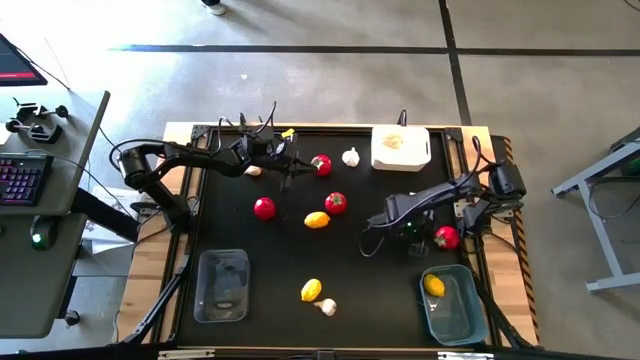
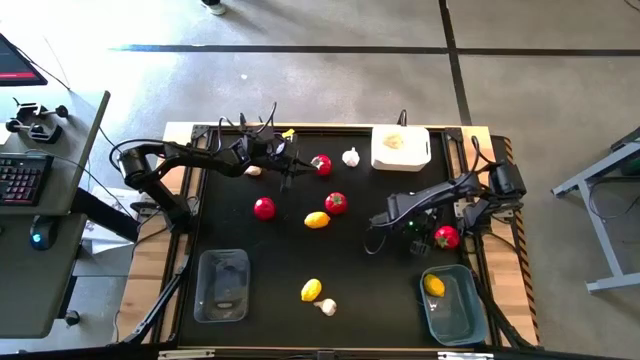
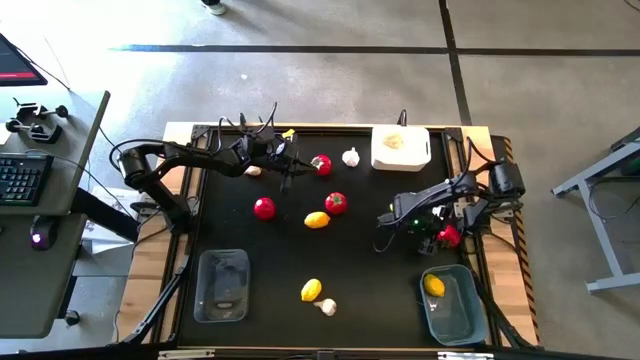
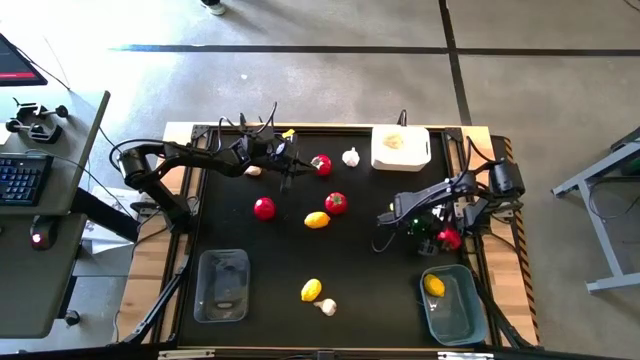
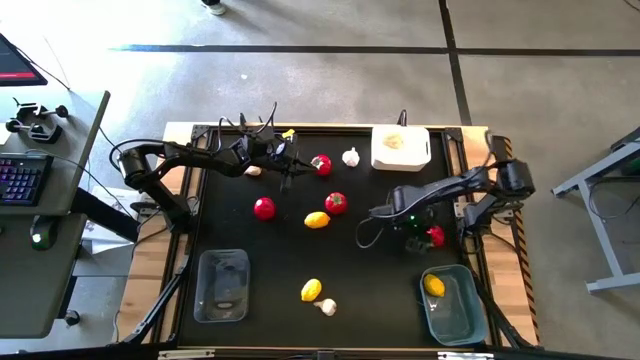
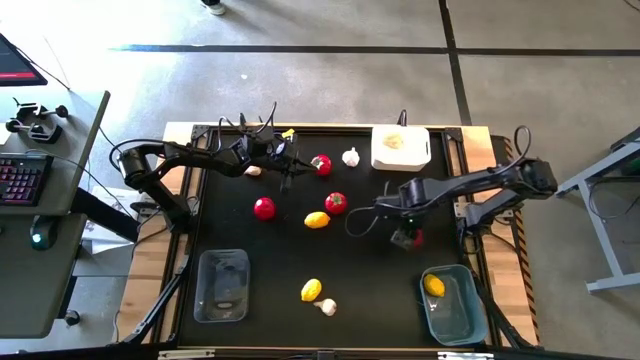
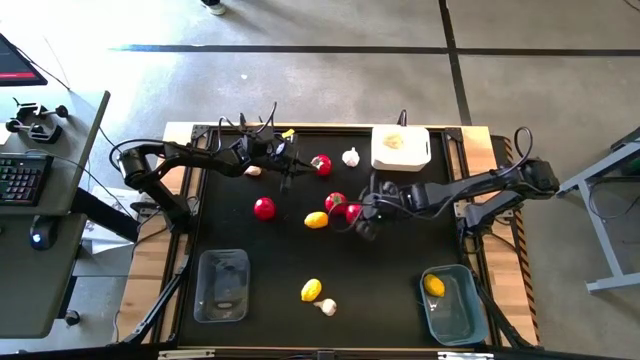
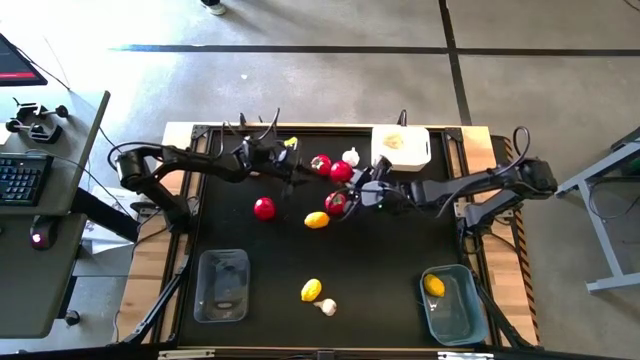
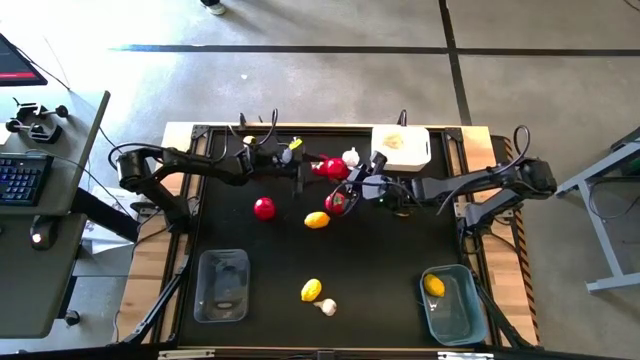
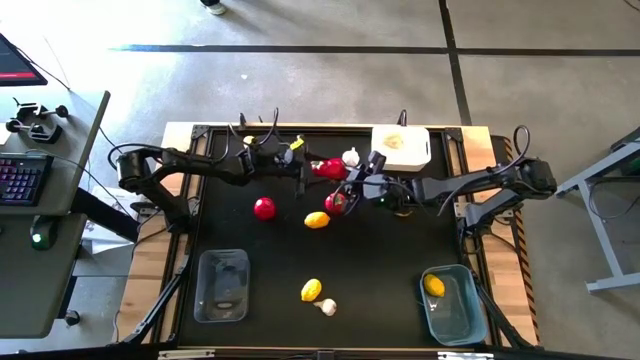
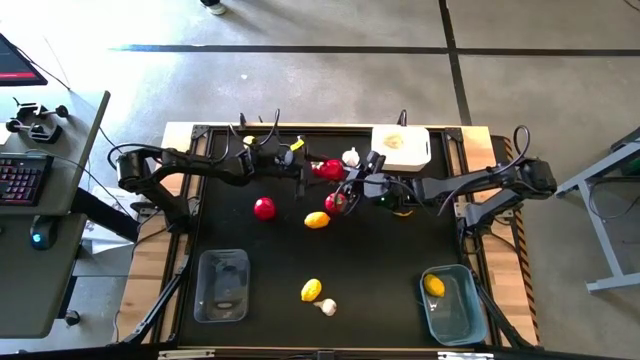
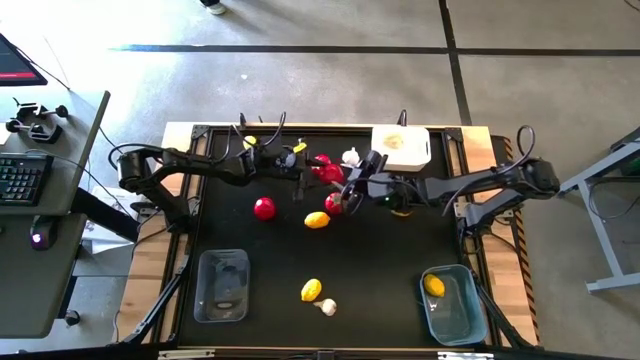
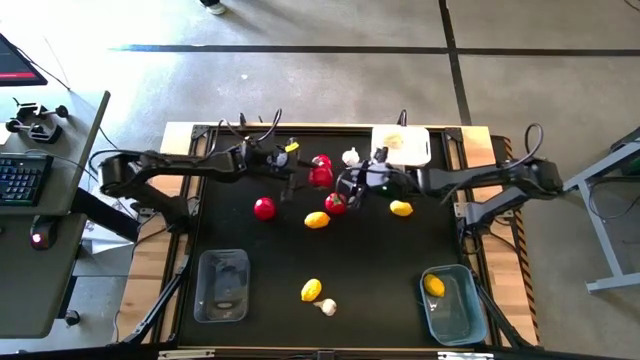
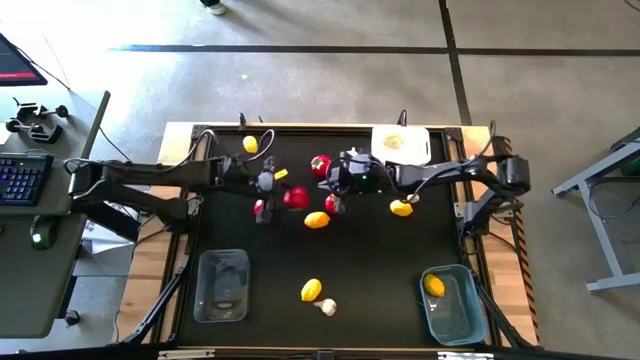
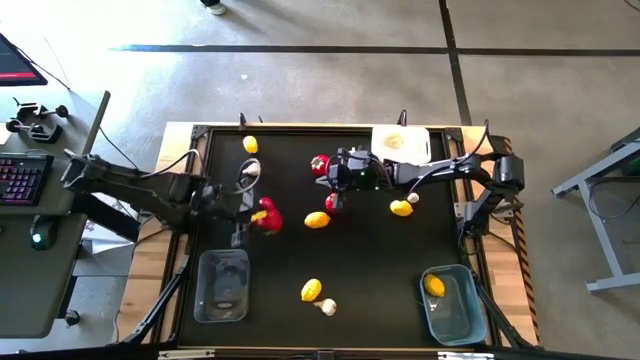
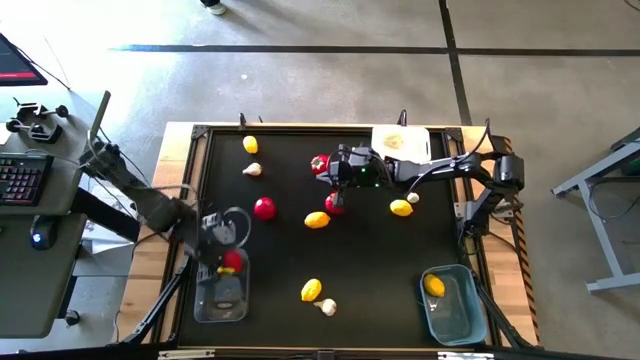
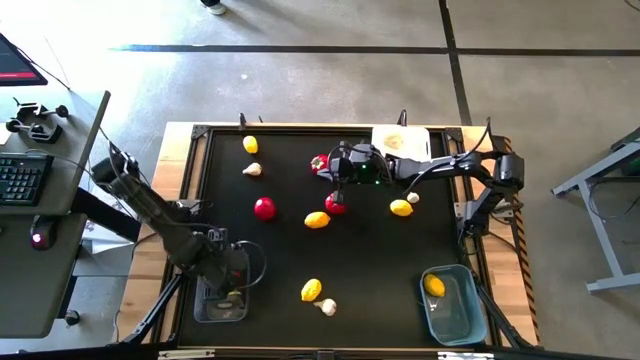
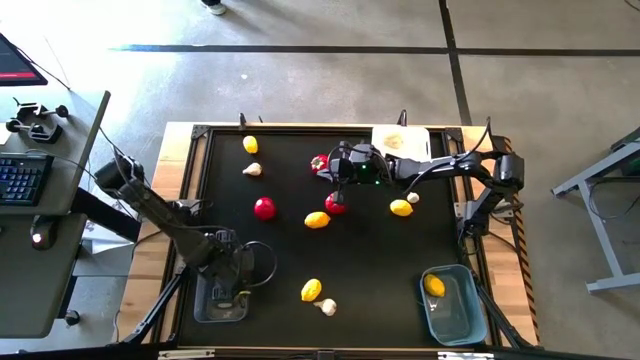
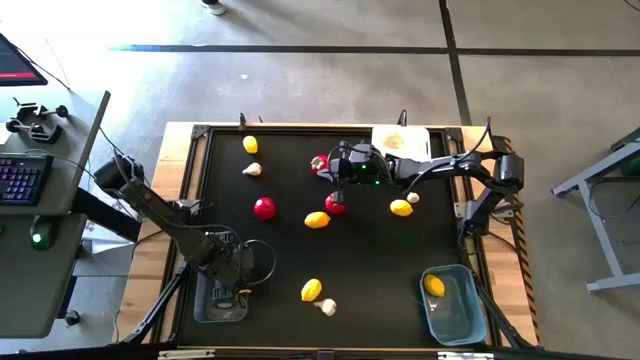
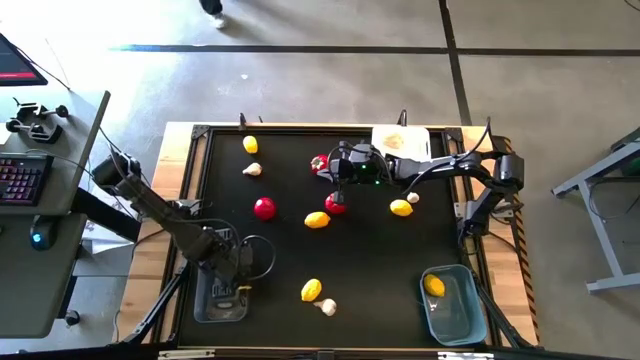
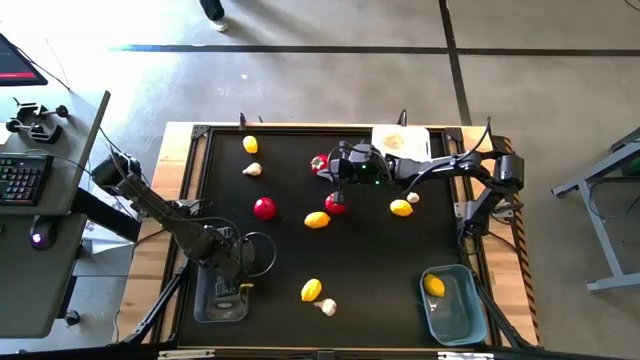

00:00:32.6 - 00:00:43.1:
Task: Sort produce into baskets
Put the tomato into the transparent bin

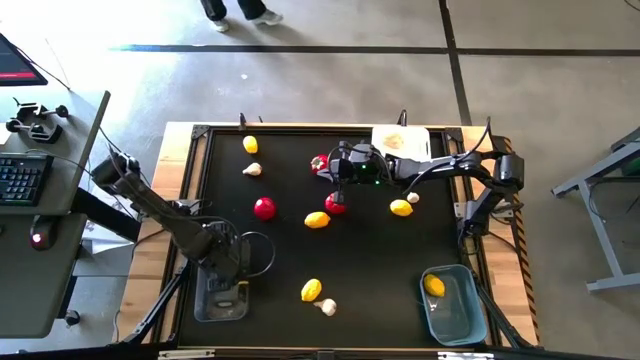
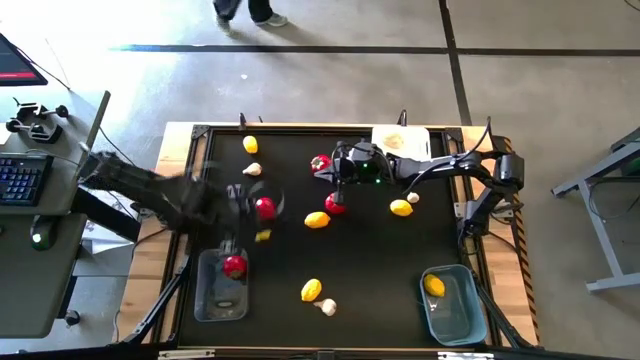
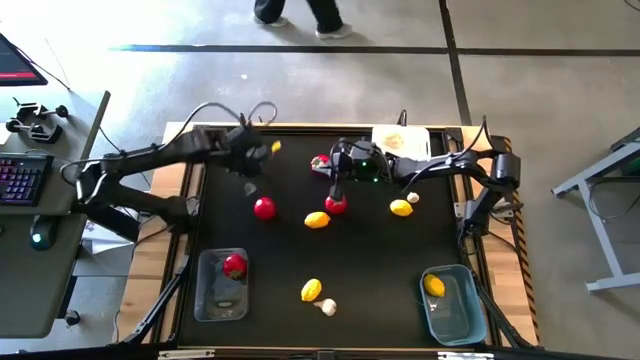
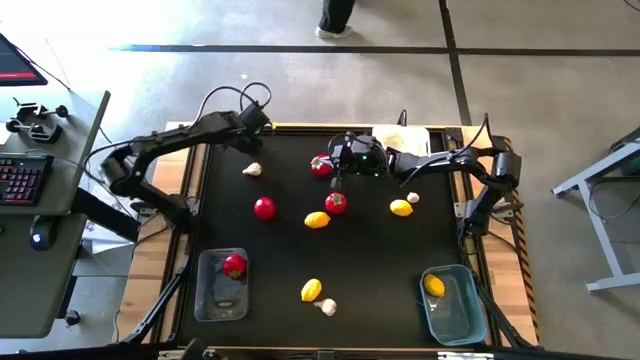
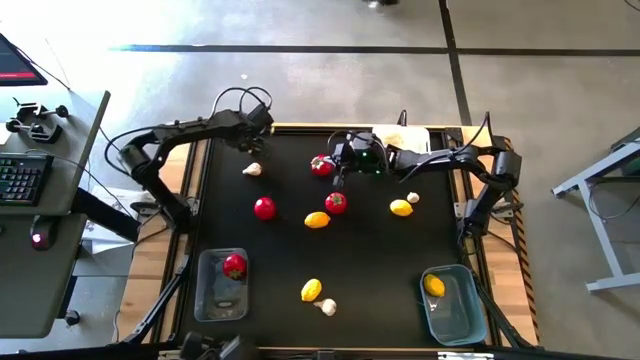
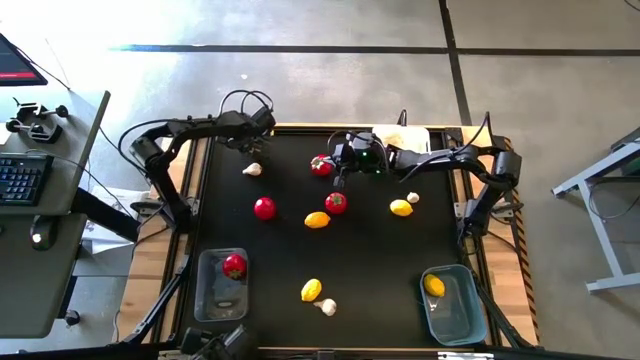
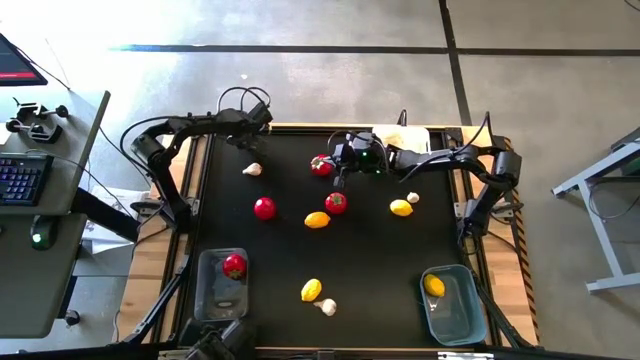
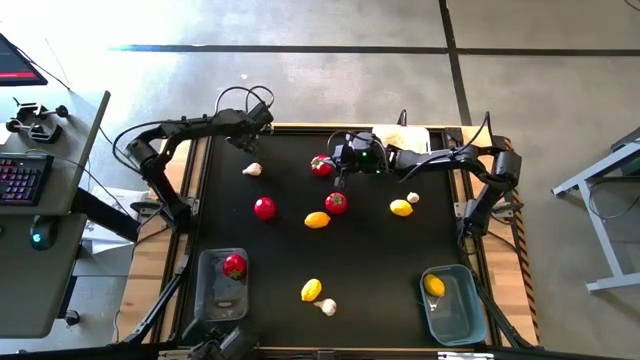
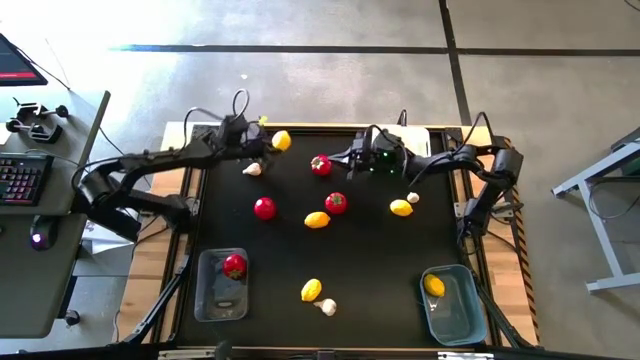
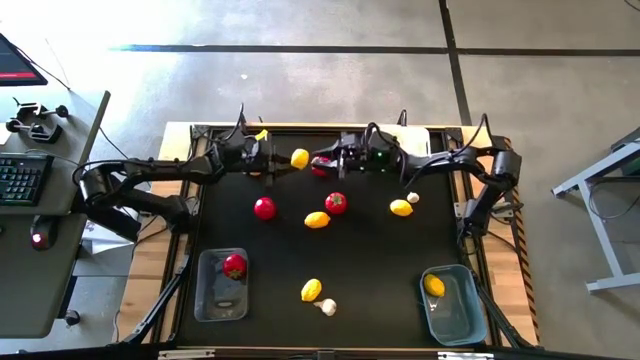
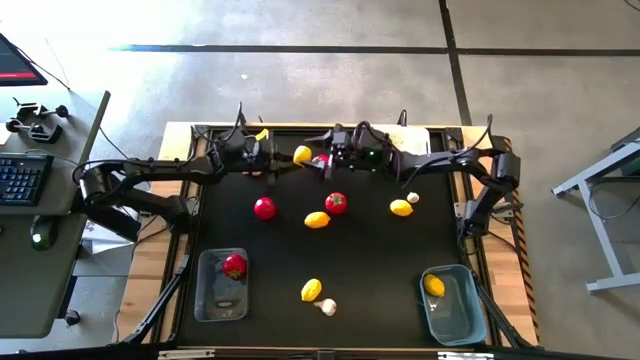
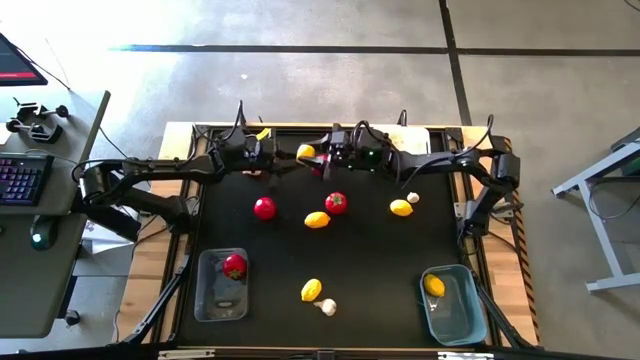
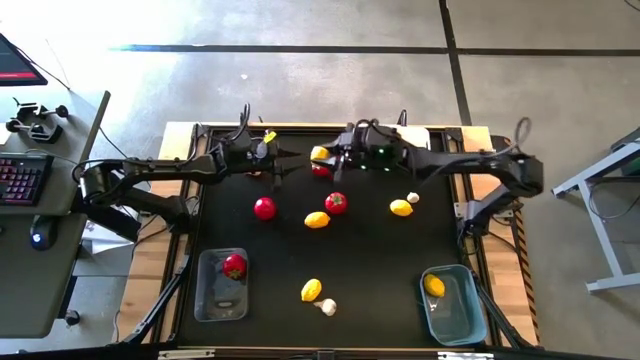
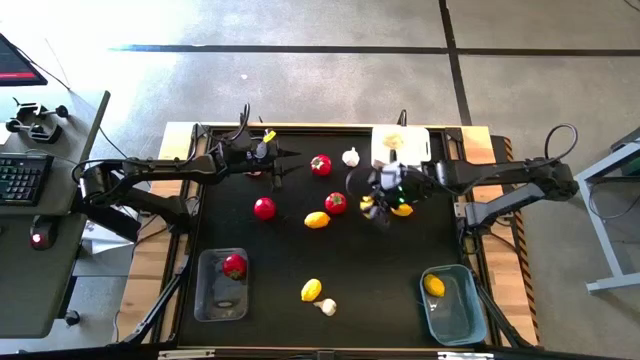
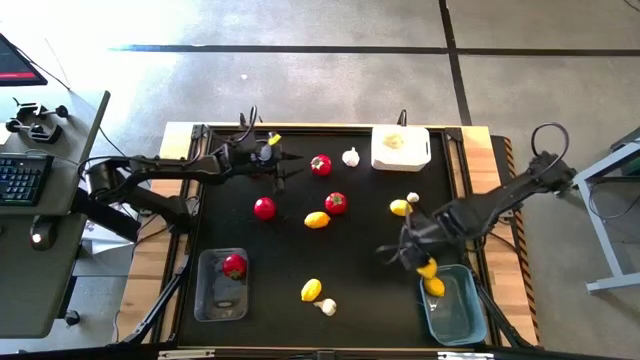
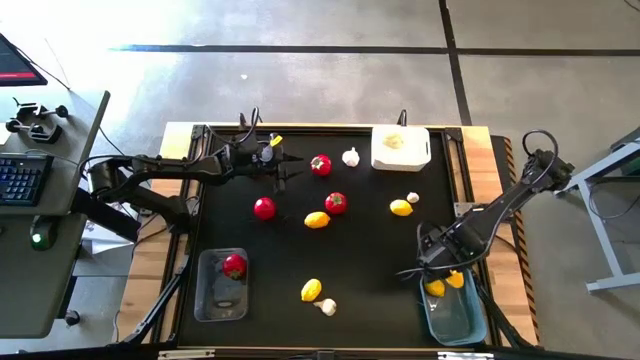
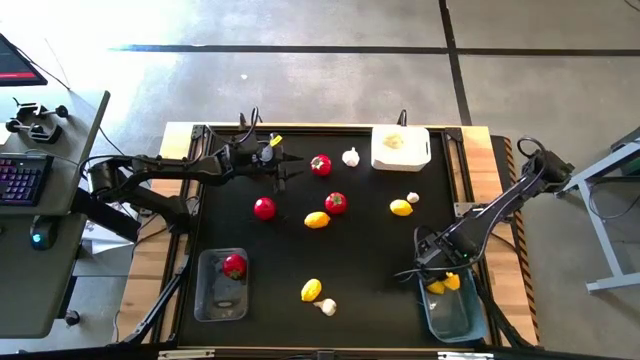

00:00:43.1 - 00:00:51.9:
Put the lemon into the blue bin

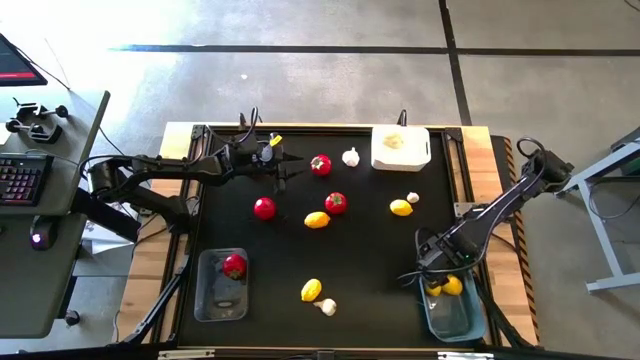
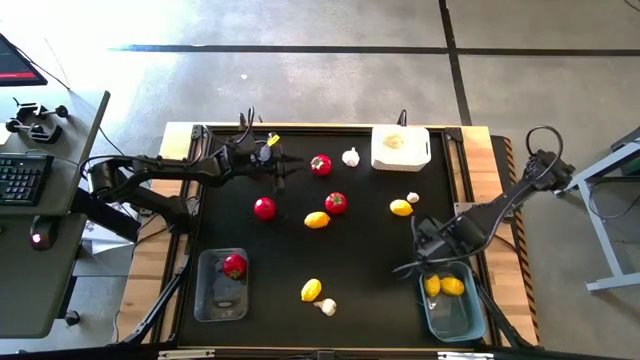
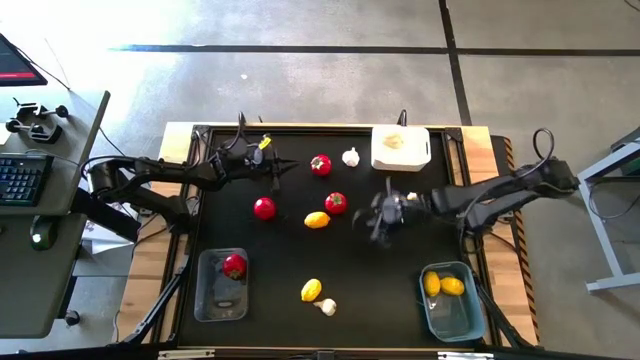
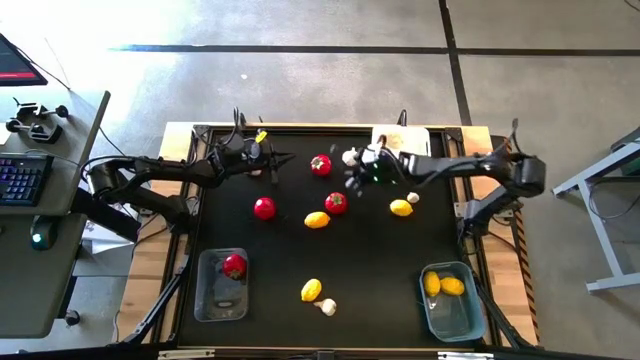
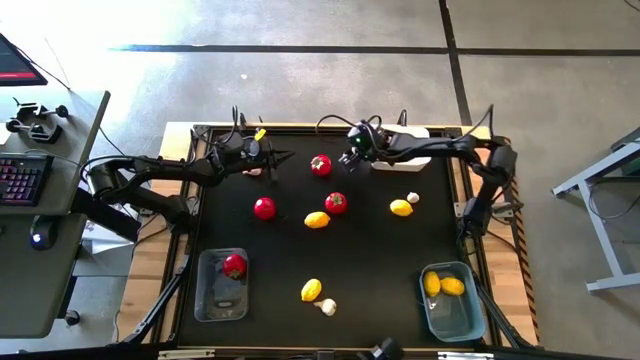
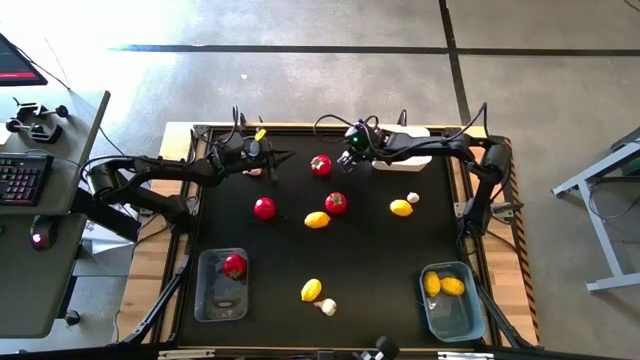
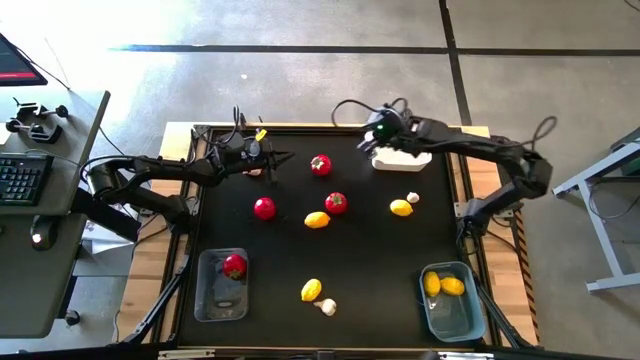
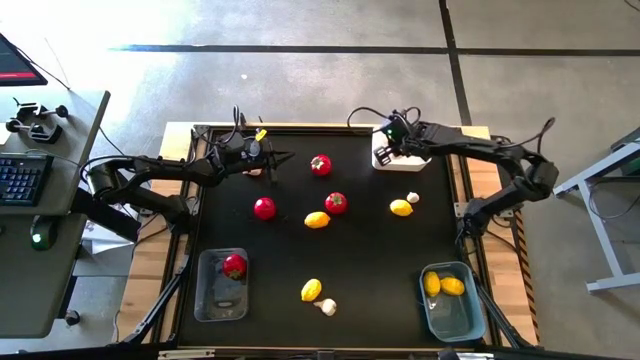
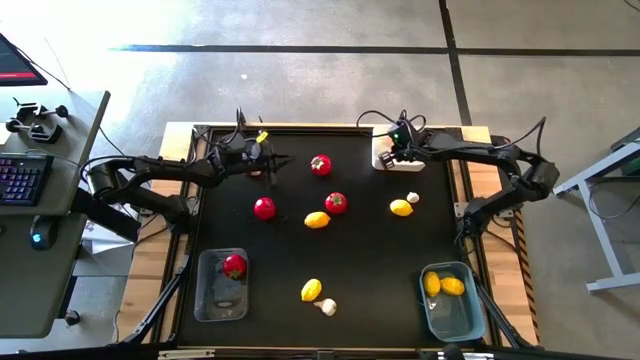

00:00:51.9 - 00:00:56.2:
Put the garlic into the white bin
